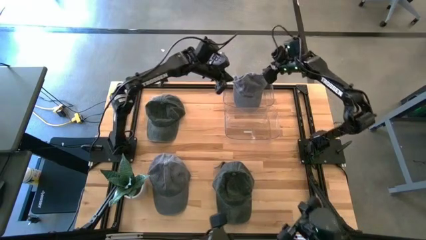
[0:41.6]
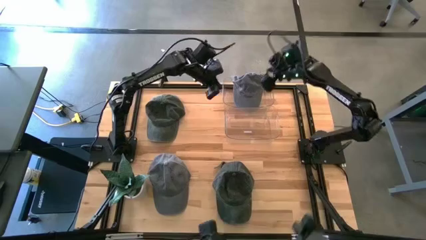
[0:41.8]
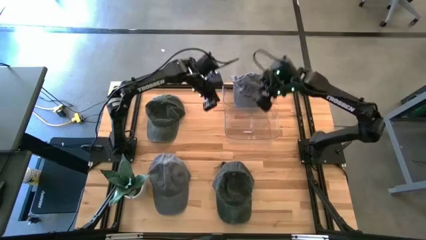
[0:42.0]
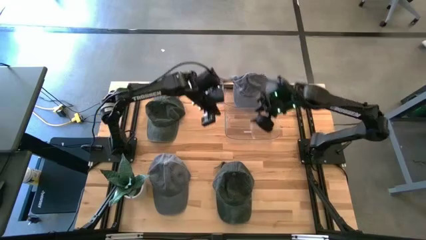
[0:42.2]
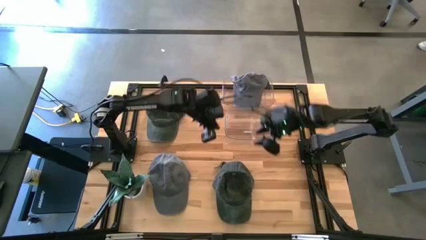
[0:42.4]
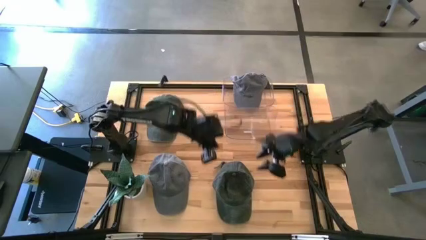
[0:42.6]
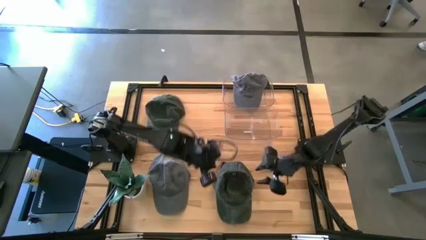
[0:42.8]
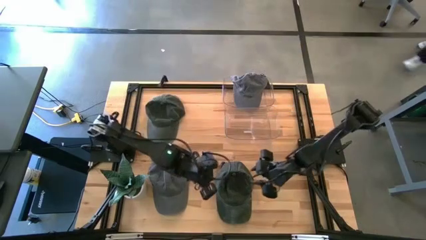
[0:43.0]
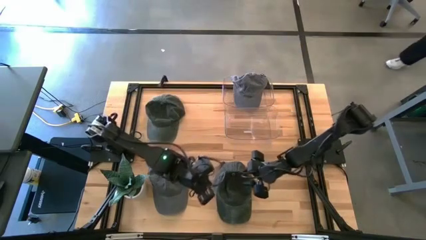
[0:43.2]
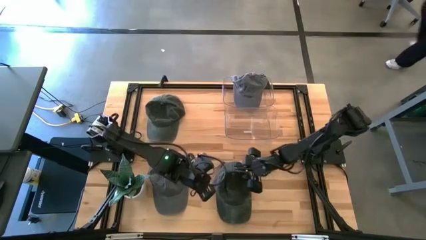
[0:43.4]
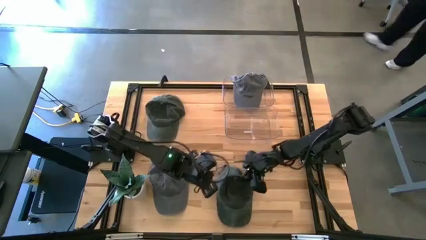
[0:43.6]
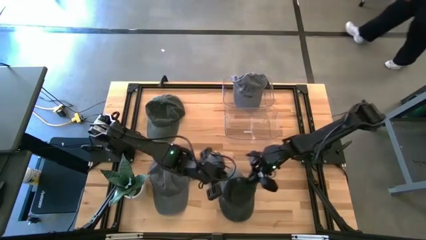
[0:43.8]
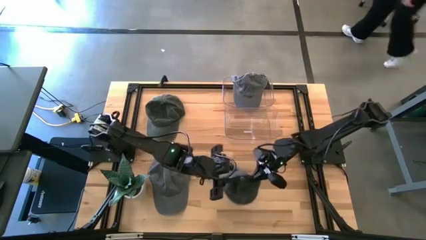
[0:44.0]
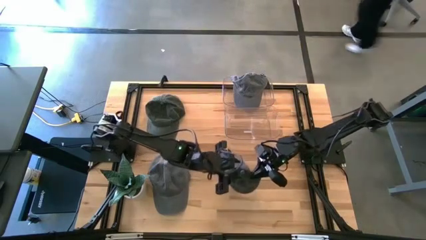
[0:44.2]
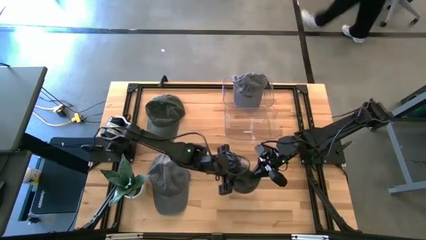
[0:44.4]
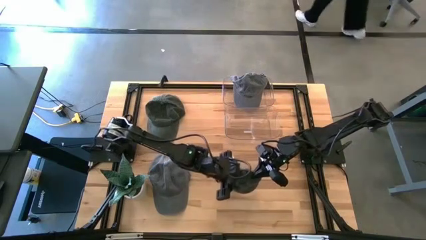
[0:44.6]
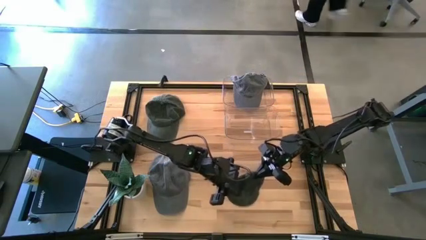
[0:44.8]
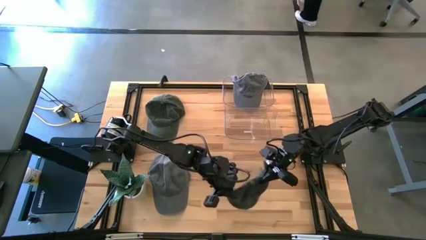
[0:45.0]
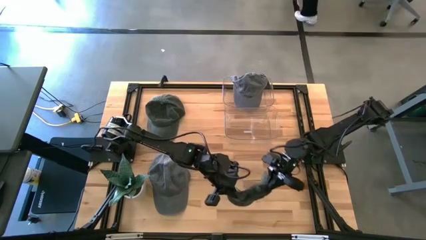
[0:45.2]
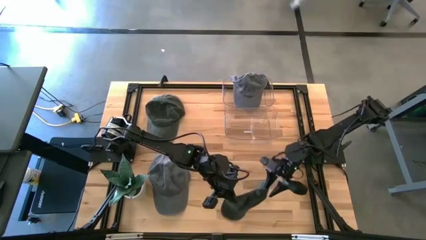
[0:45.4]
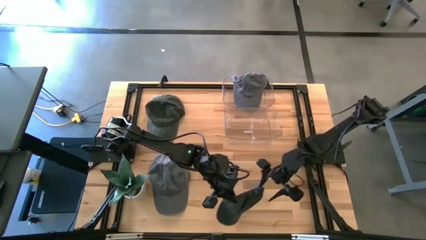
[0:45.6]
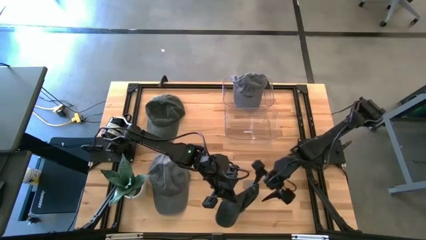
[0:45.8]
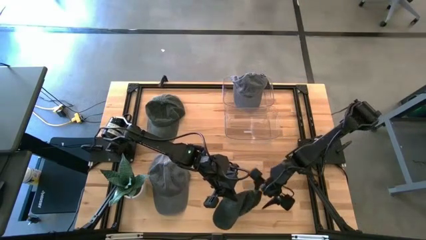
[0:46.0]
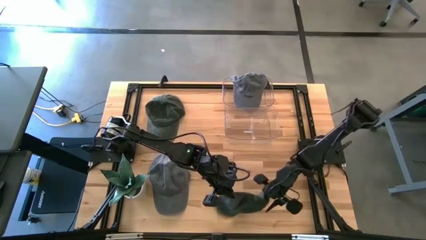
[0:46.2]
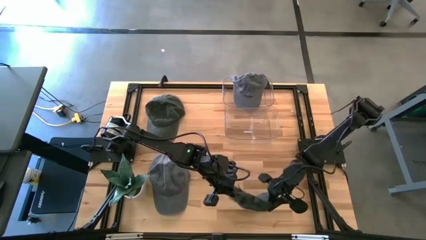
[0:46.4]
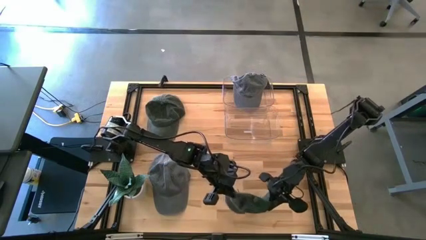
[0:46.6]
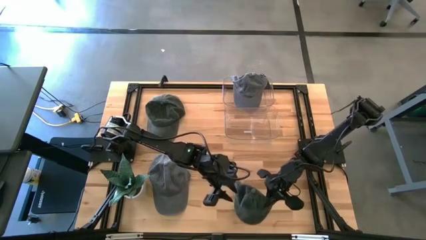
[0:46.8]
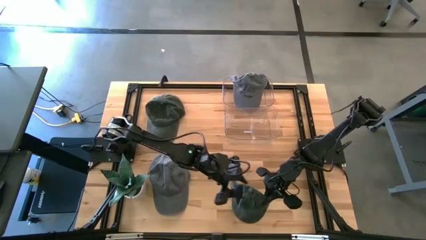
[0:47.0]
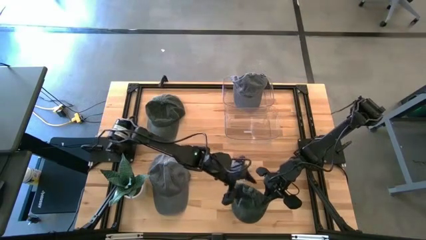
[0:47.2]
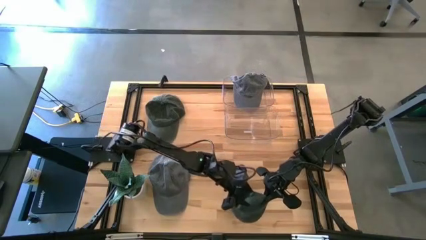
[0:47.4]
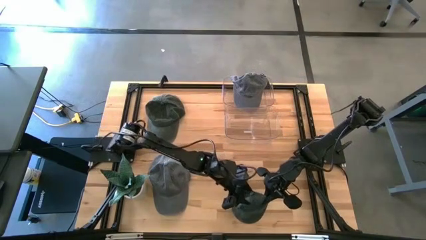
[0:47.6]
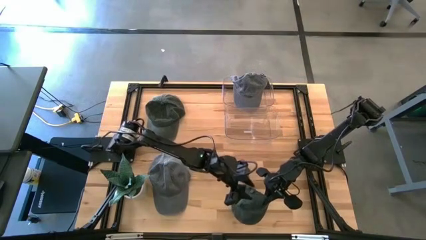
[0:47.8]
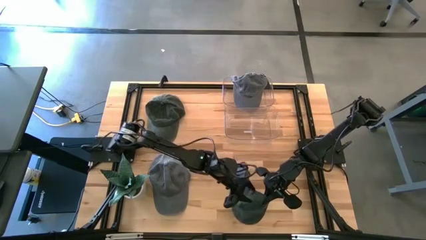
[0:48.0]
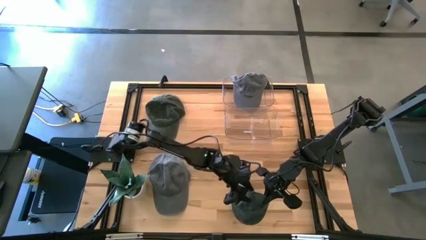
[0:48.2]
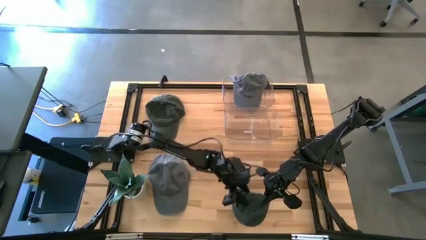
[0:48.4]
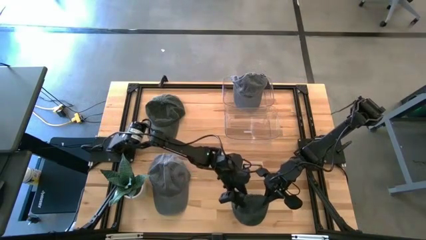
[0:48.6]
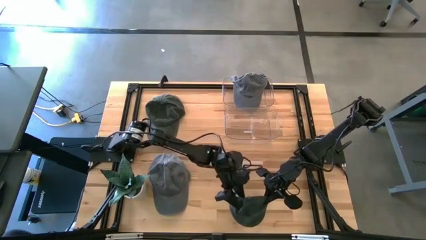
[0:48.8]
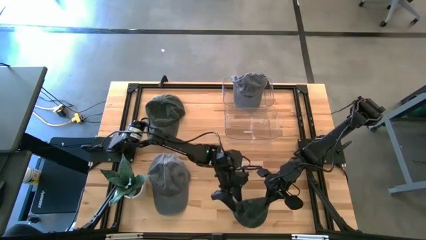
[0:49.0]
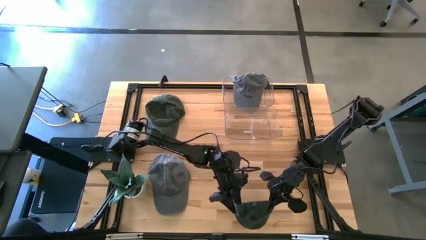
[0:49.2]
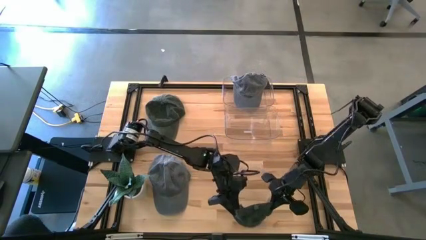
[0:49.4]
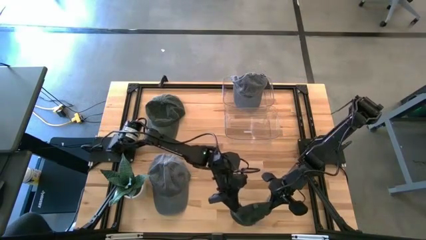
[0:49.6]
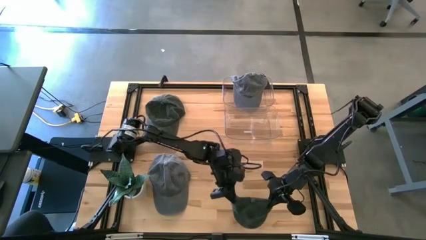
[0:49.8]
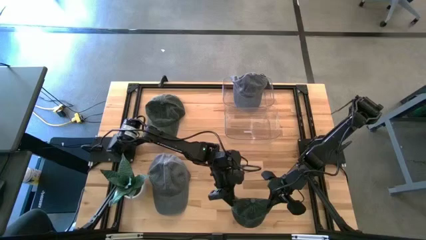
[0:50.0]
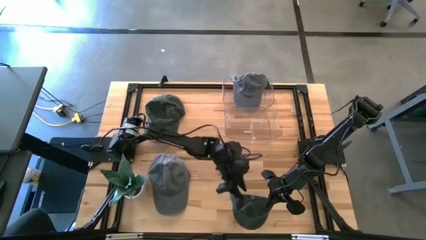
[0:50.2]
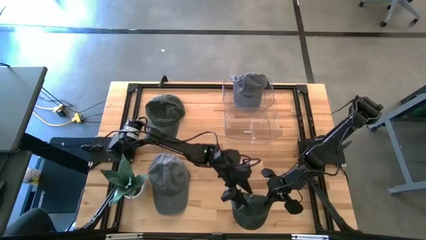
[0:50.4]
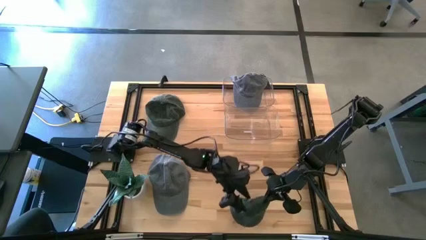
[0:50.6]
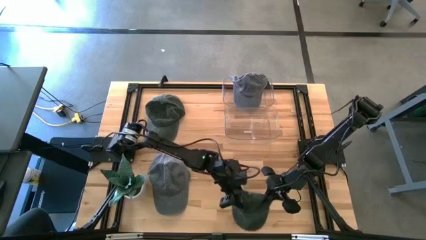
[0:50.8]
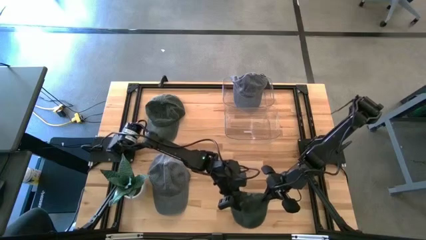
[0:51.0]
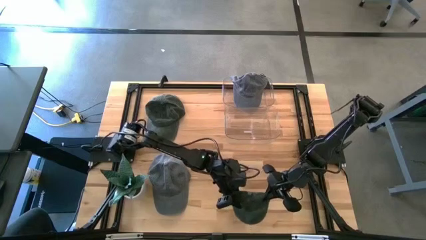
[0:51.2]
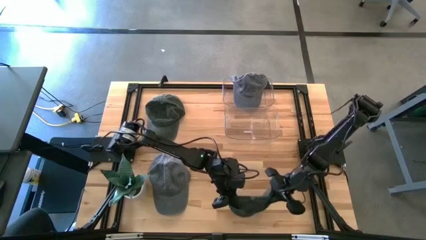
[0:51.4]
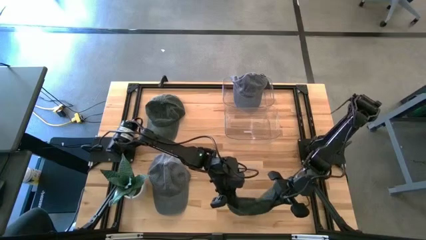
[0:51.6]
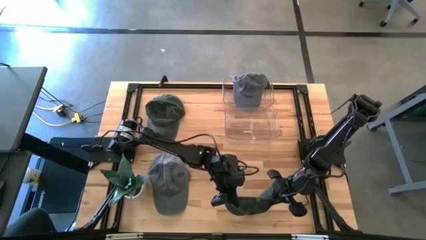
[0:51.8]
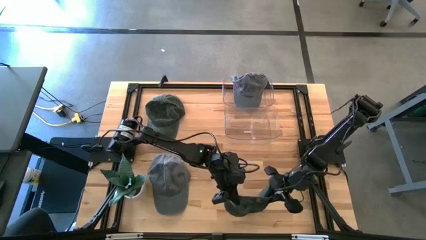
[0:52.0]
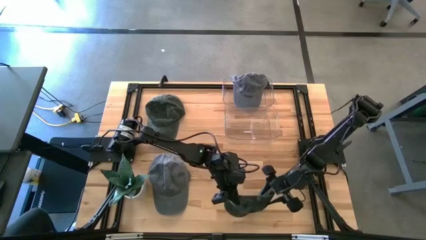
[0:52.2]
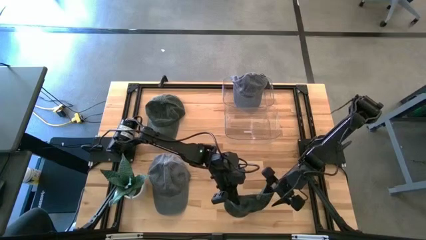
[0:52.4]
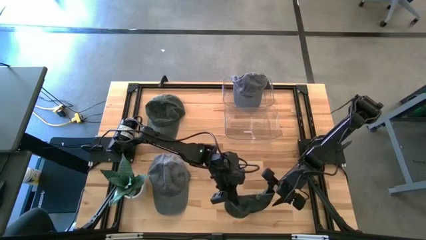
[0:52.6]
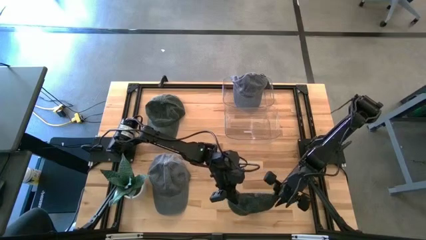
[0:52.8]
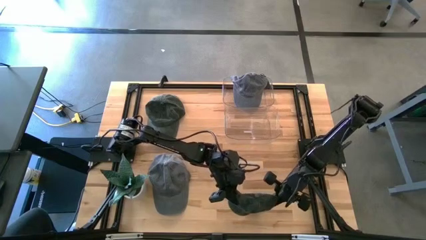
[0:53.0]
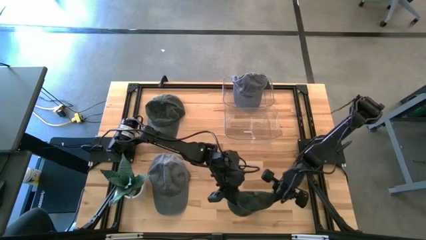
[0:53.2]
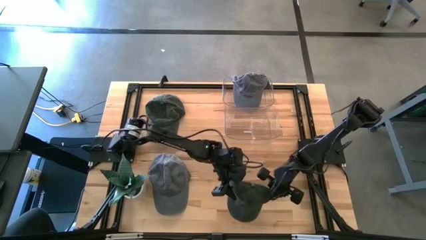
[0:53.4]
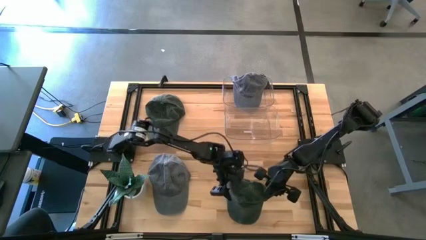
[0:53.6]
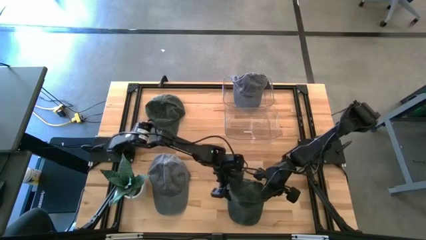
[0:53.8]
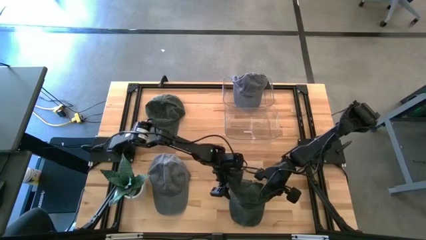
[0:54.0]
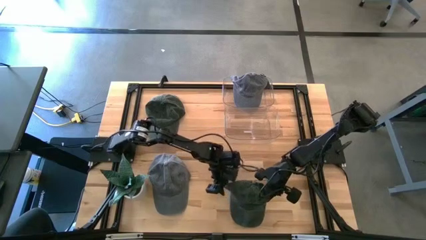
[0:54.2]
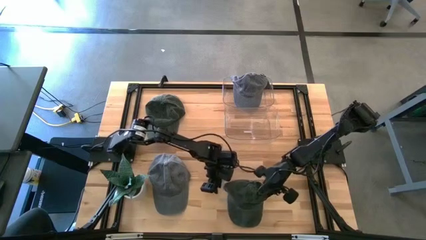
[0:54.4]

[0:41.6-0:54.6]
Task: Pick & Place hat
Put the bottom black cap into the bottom transparent bin

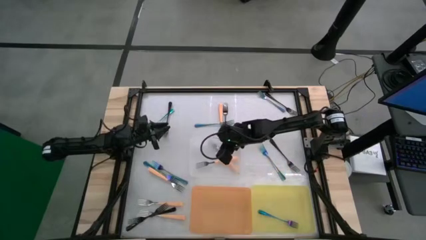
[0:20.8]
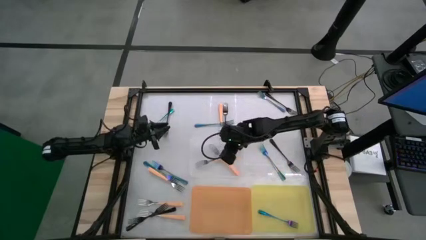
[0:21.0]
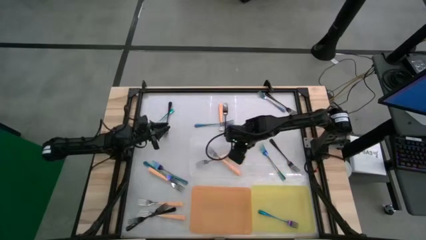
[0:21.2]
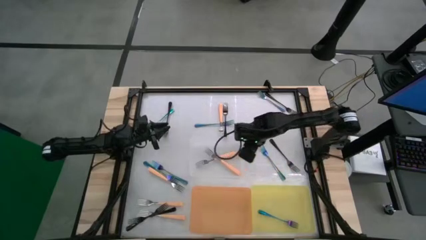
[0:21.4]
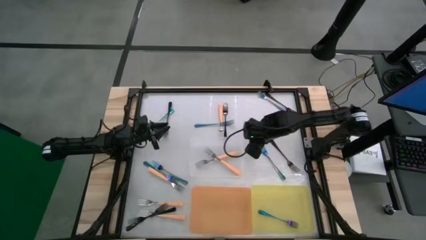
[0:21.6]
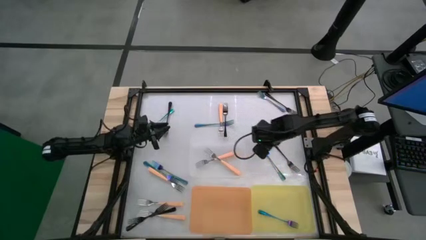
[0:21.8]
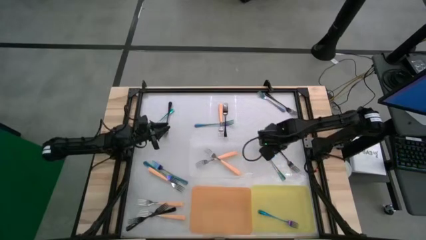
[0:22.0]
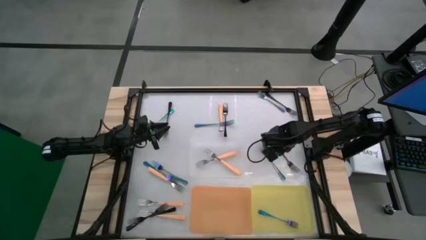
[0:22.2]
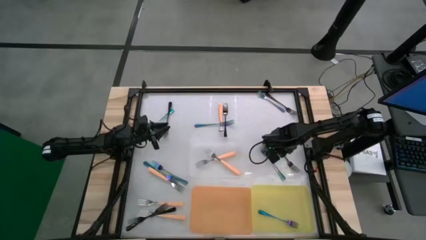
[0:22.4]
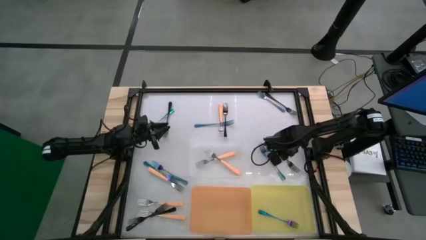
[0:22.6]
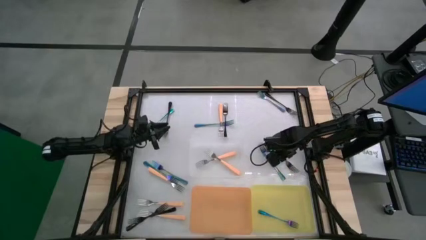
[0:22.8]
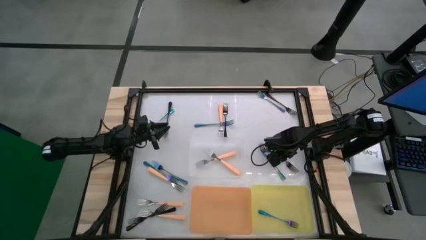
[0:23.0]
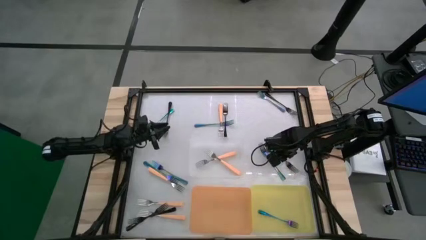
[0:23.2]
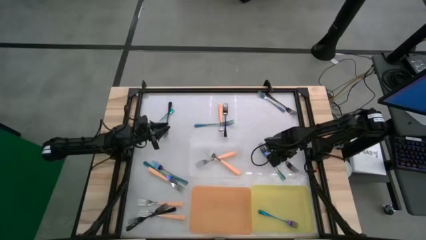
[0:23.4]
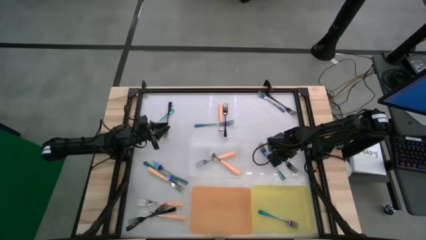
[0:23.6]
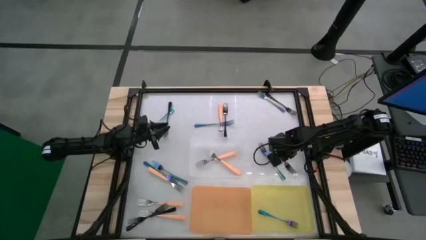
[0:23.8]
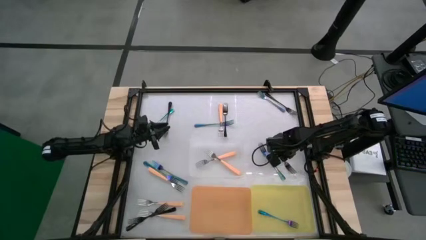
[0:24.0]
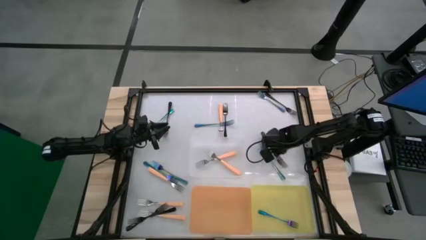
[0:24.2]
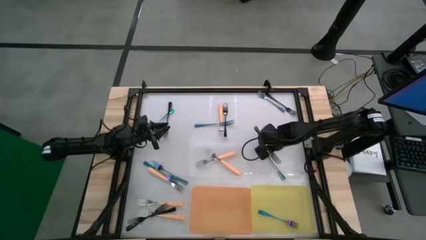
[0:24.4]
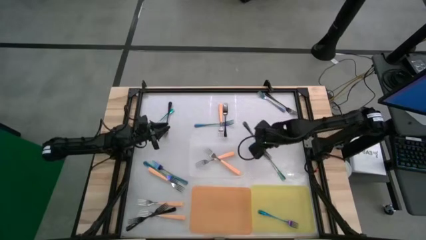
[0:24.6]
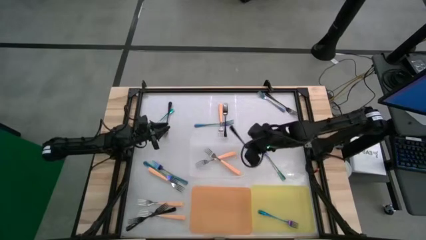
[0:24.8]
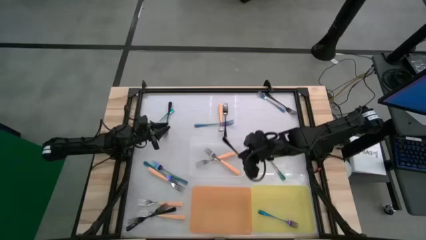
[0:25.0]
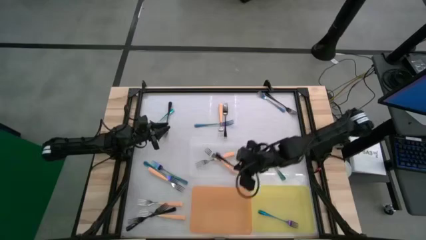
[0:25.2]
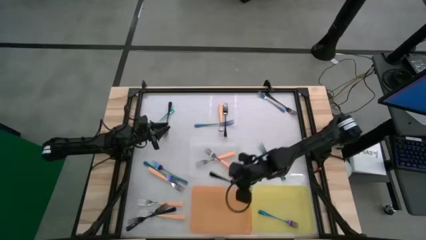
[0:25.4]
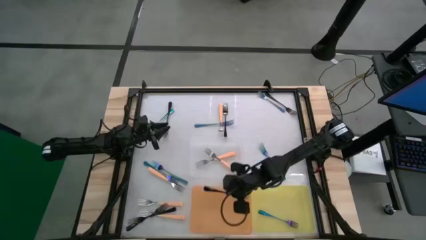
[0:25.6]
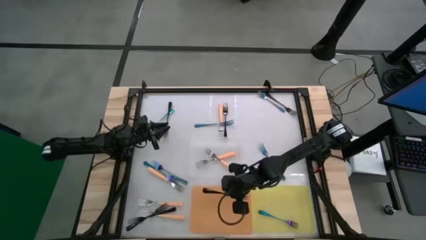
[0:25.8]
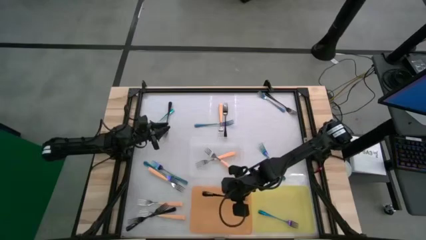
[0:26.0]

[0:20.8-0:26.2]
Task: Sort silverware by color (type)
Put the black fork into the orange bin
